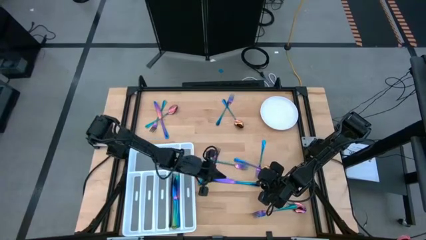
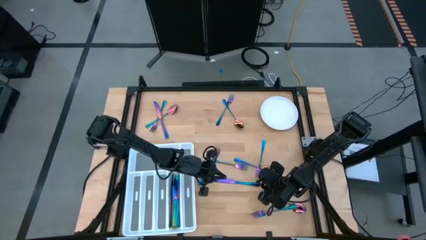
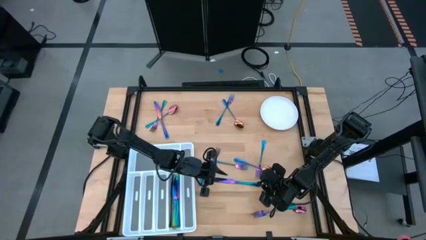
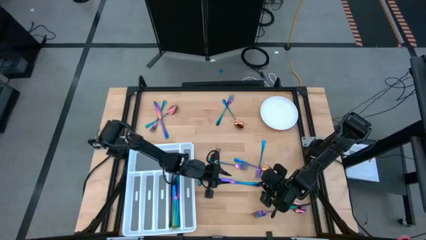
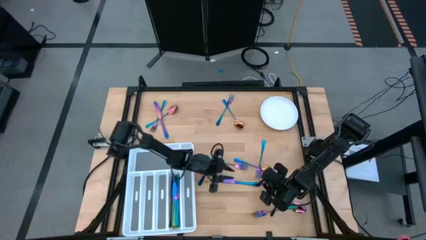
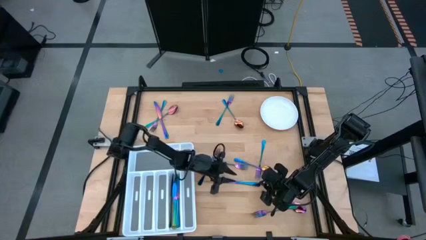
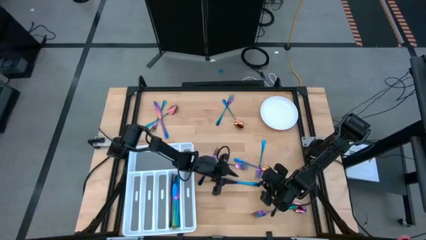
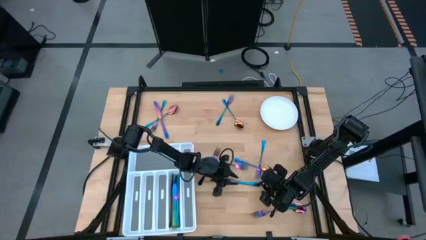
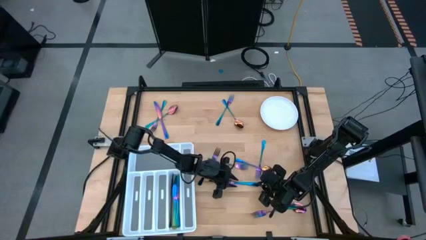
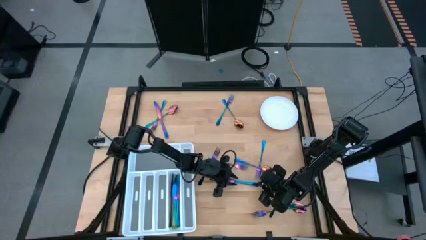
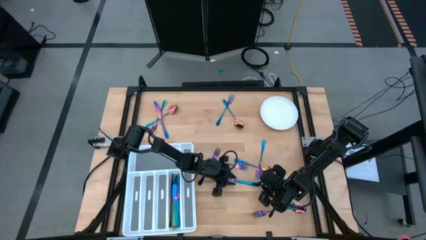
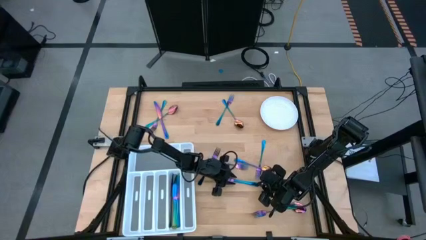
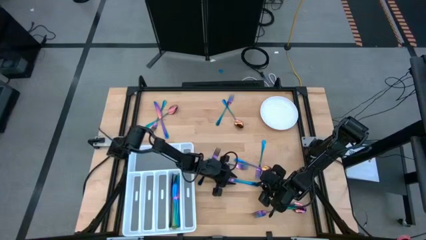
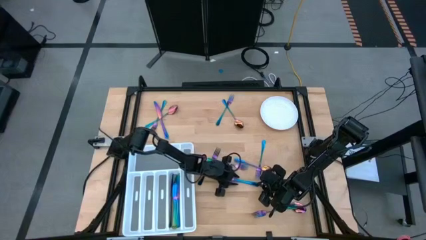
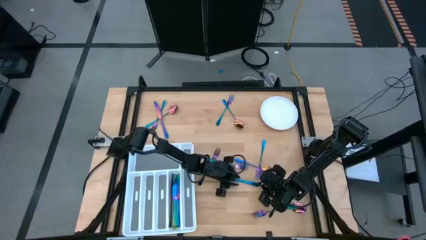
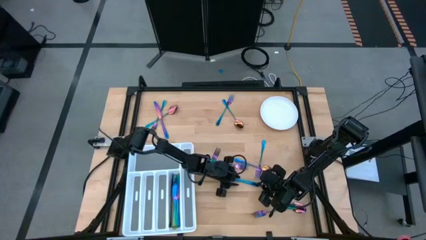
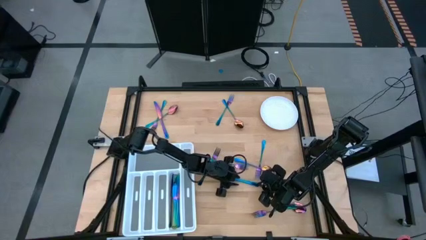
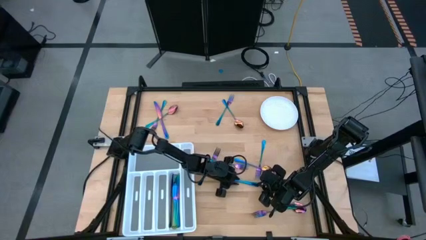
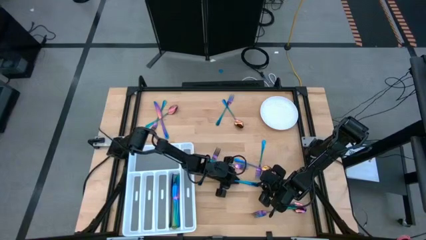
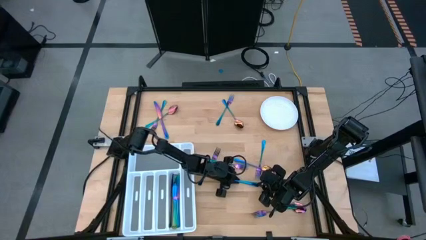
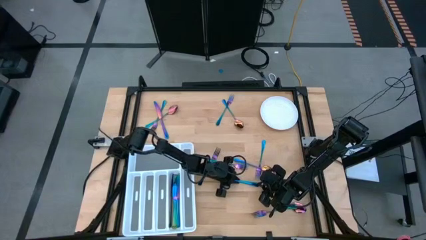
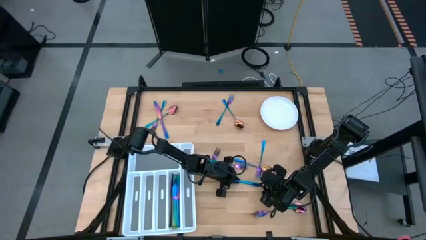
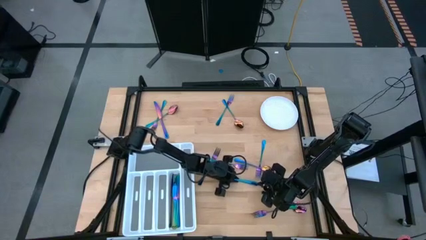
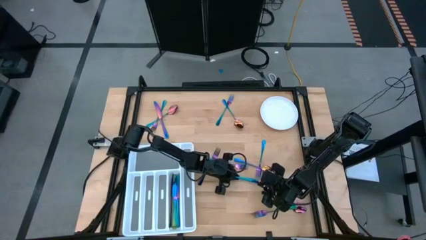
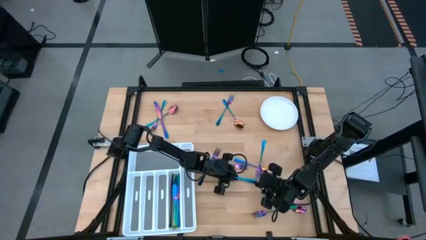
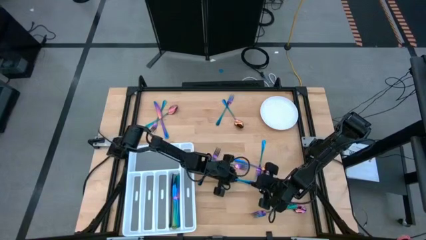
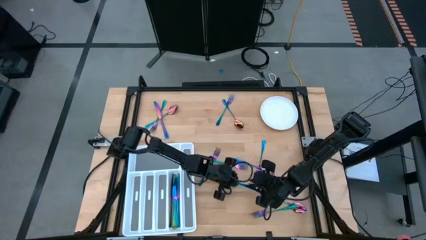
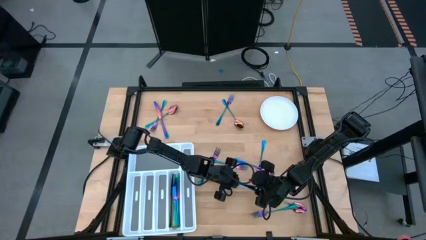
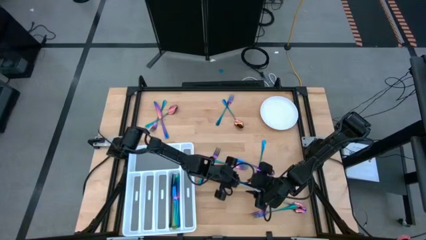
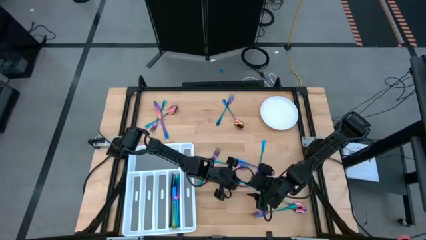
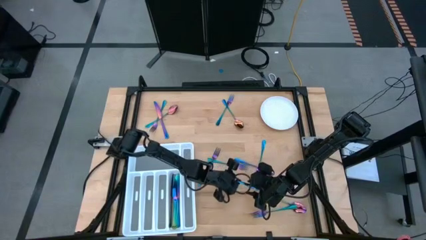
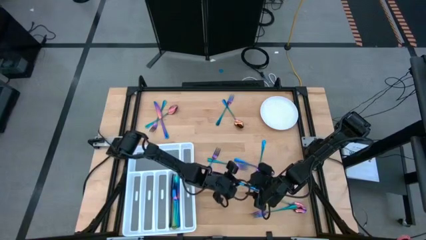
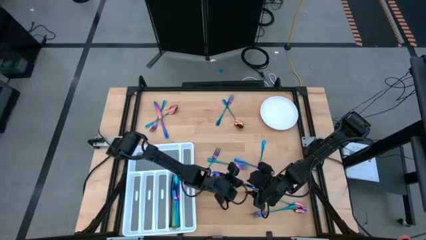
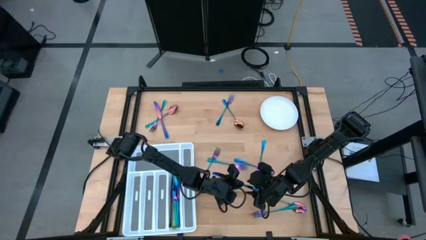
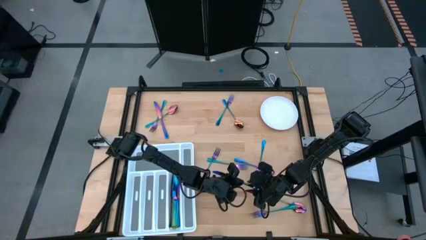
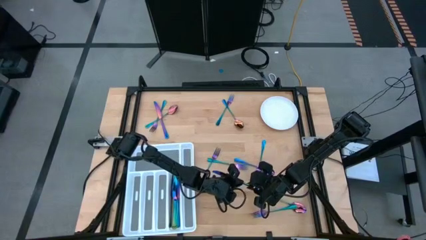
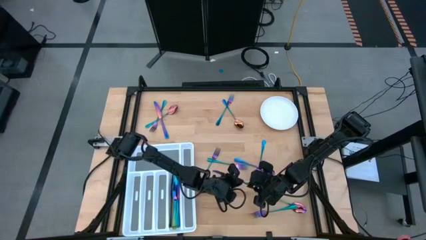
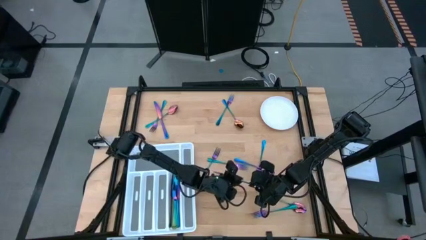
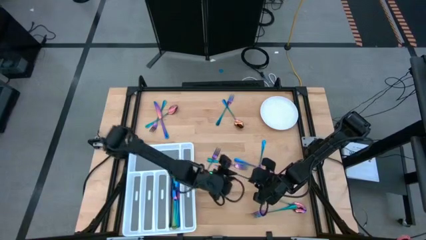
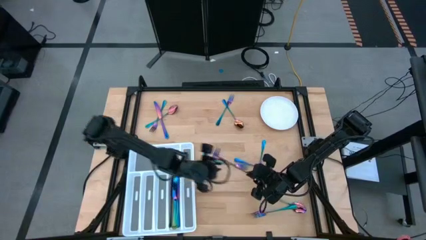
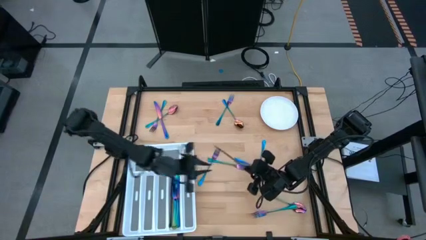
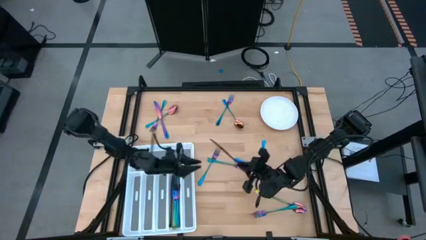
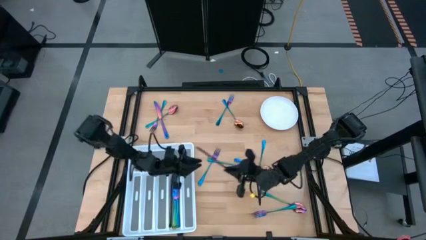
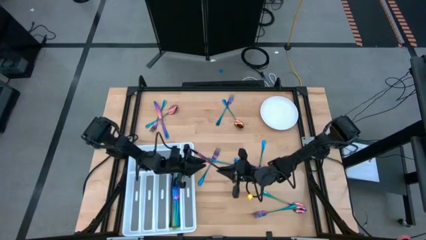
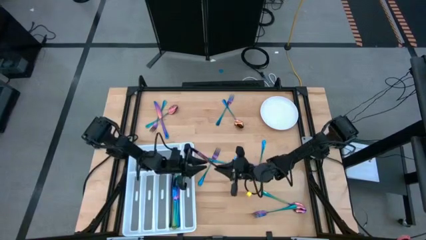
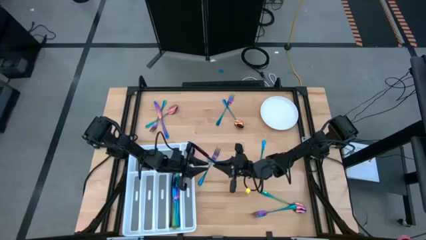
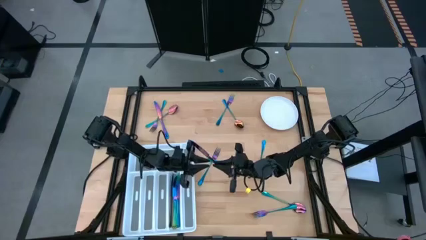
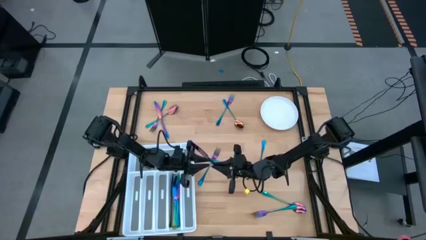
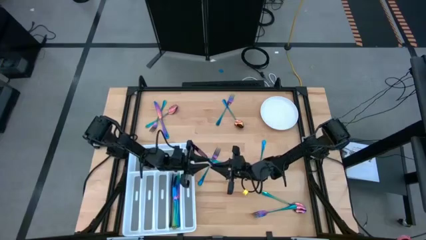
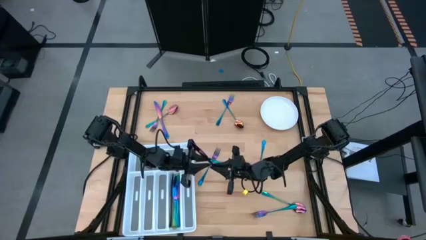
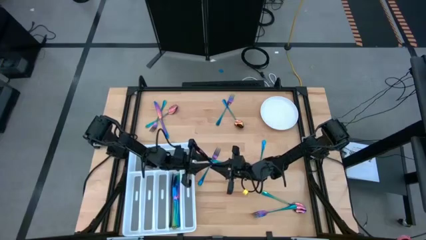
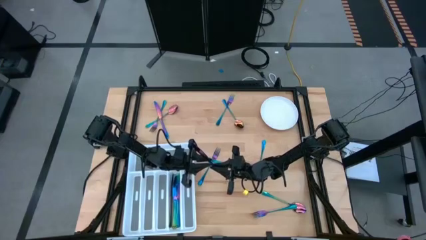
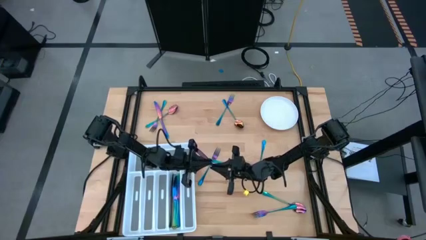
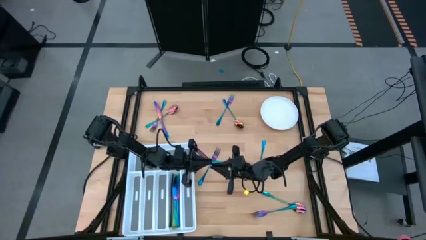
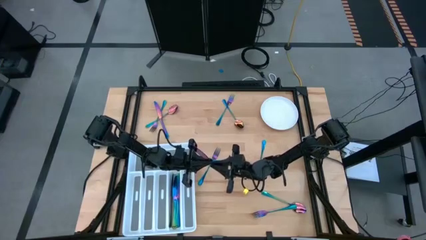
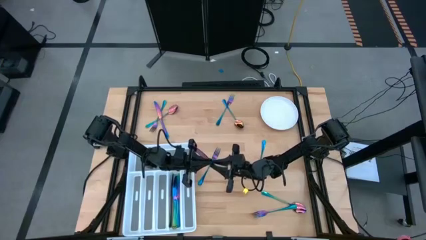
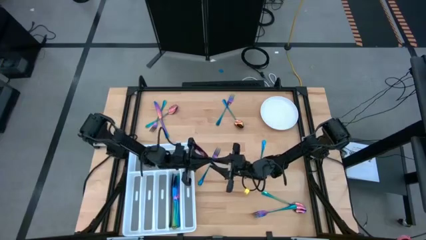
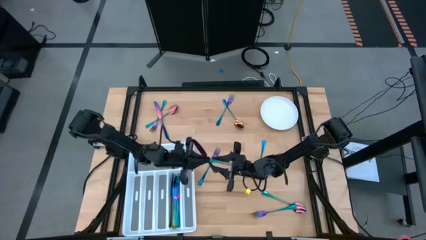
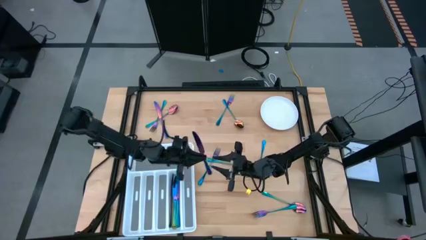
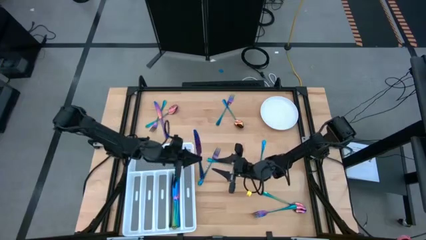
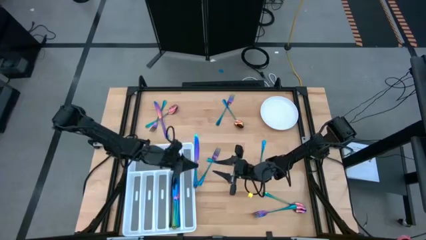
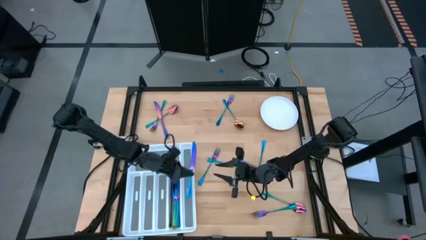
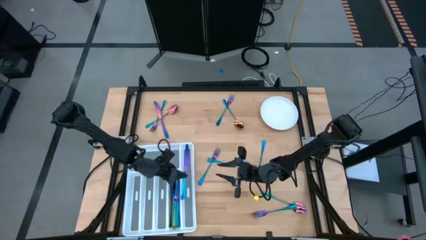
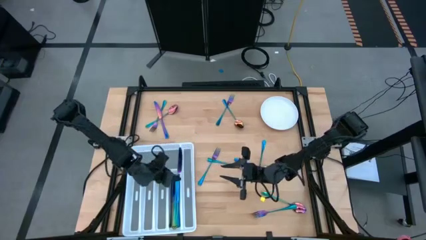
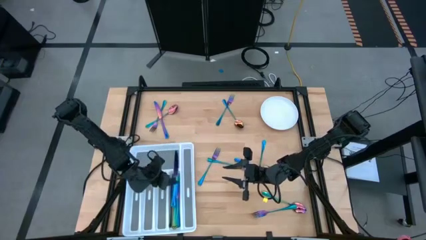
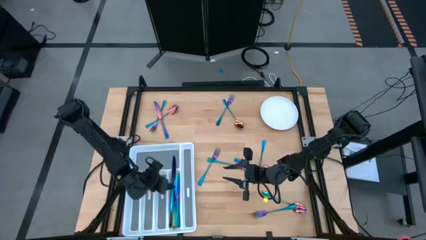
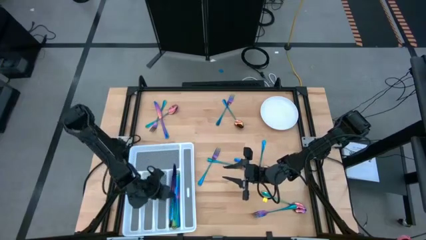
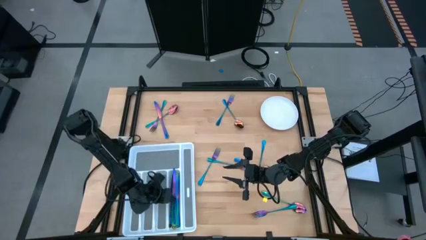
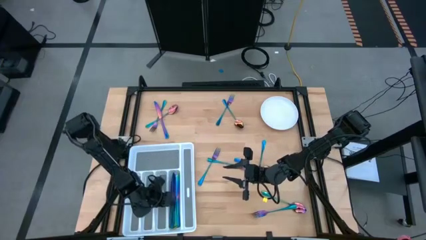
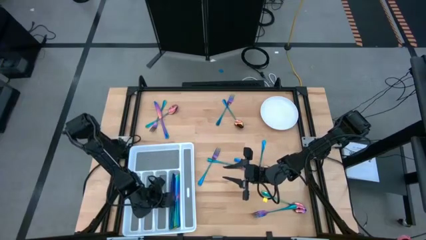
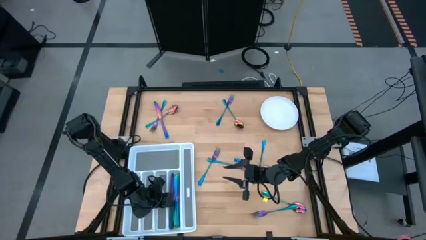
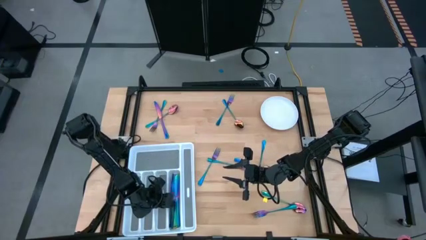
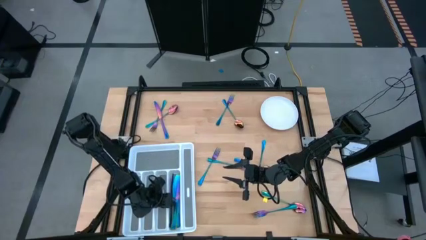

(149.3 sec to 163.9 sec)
Task: Sort silverware
Put the bottom iridescent knife into the cutlery tray

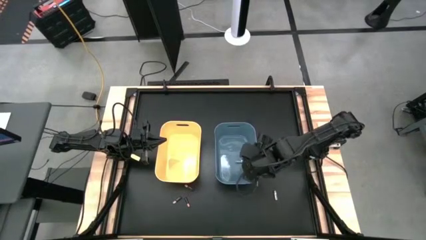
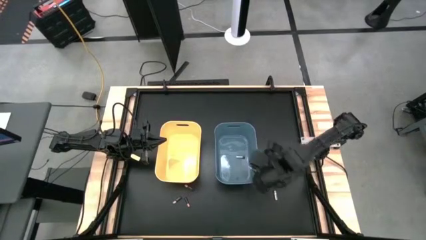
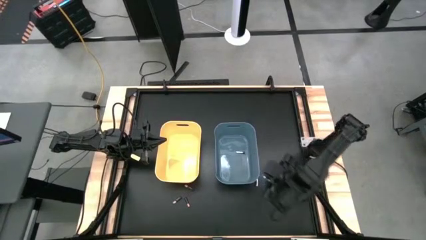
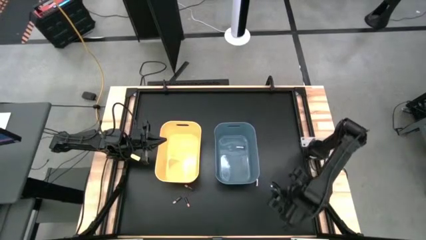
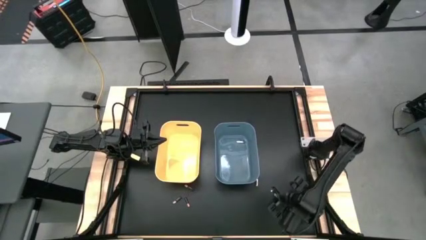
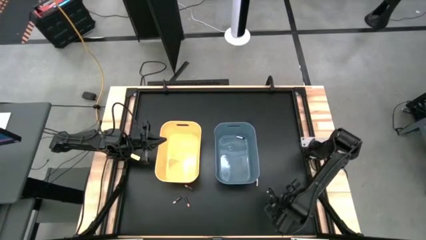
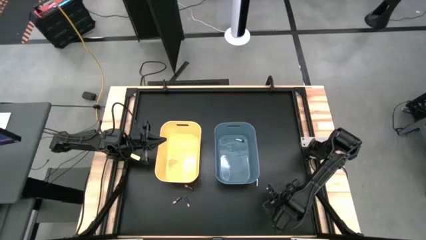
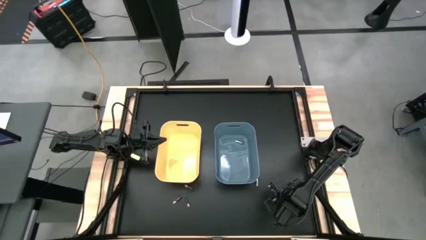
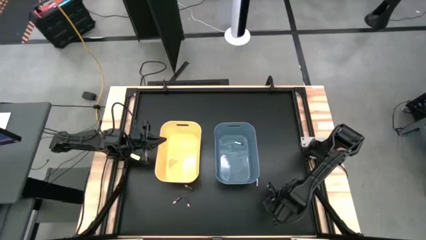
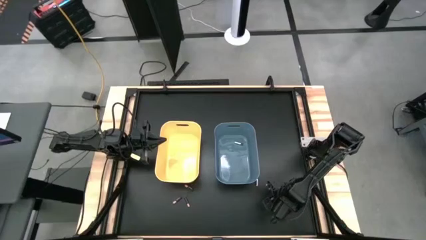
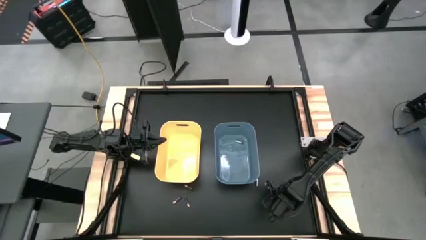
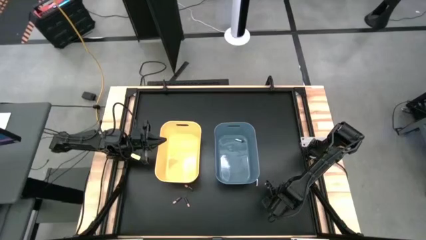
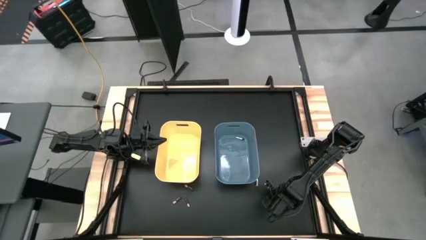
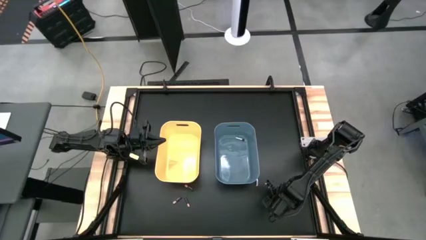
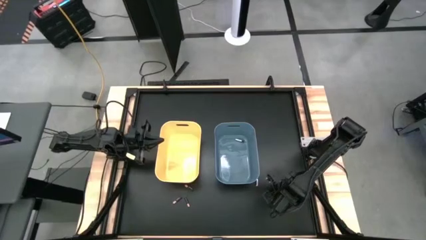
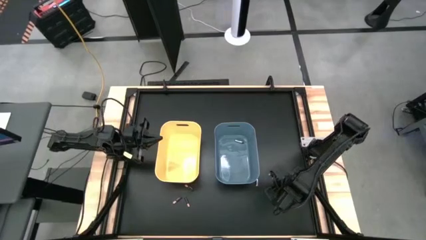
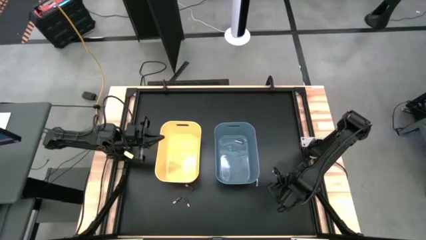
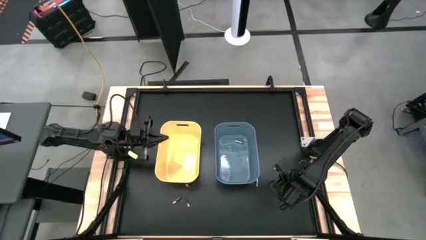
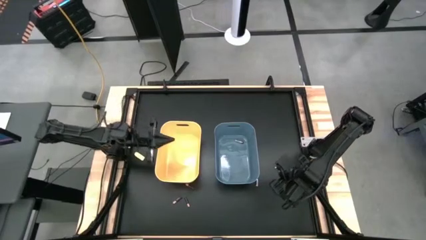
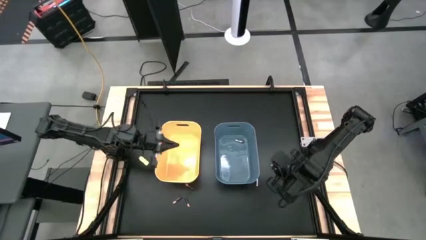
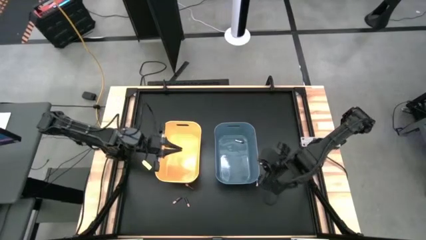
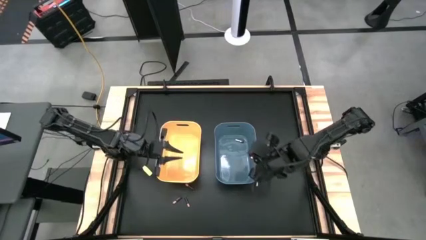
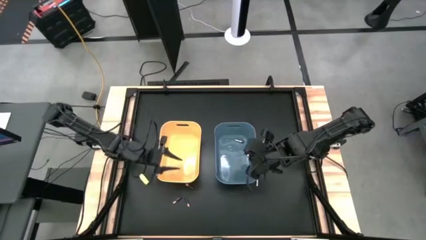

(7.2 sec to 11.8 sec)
Task: Sort batteries
Put the bottom silver battery into the blue bin
